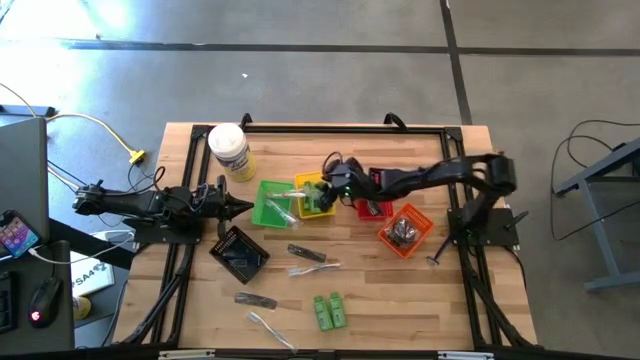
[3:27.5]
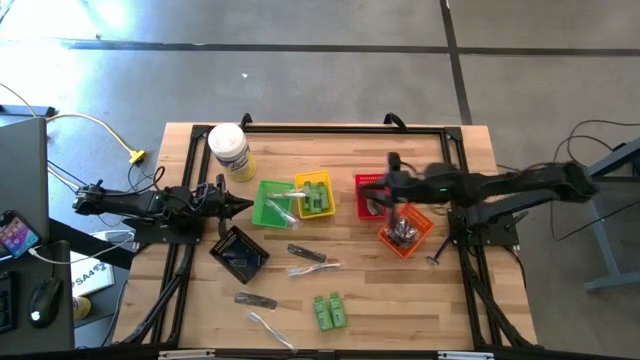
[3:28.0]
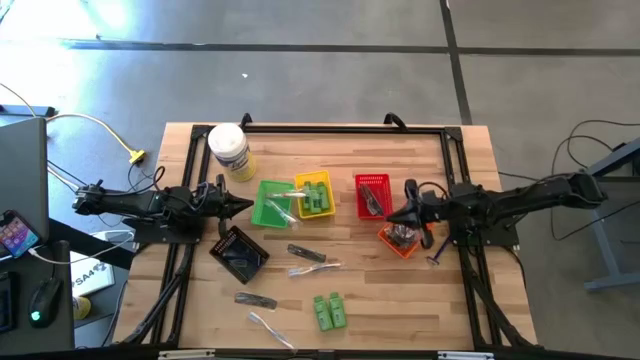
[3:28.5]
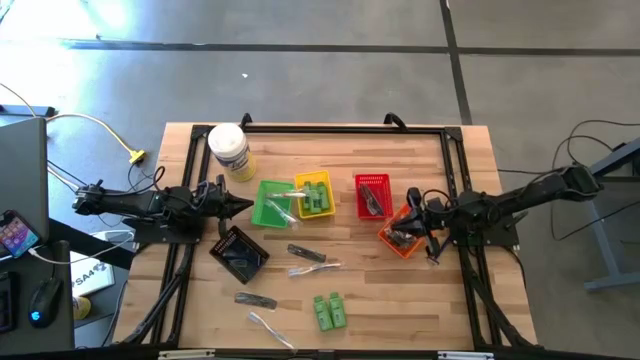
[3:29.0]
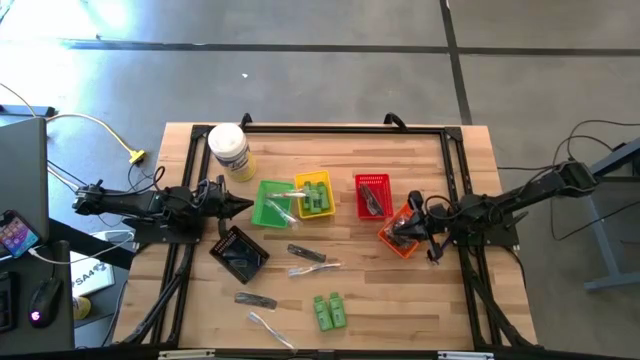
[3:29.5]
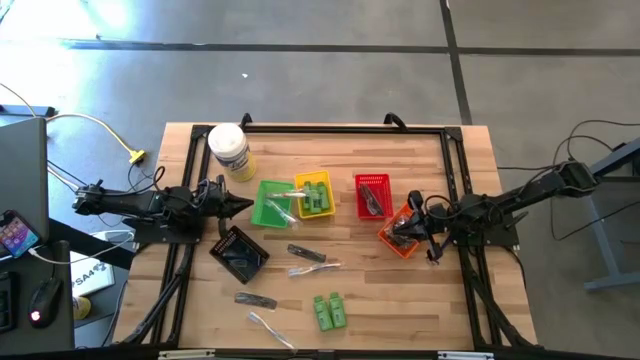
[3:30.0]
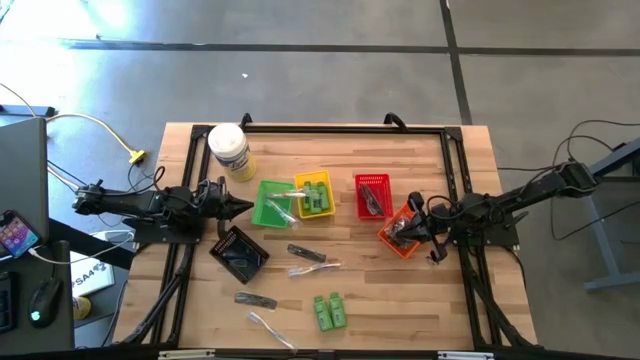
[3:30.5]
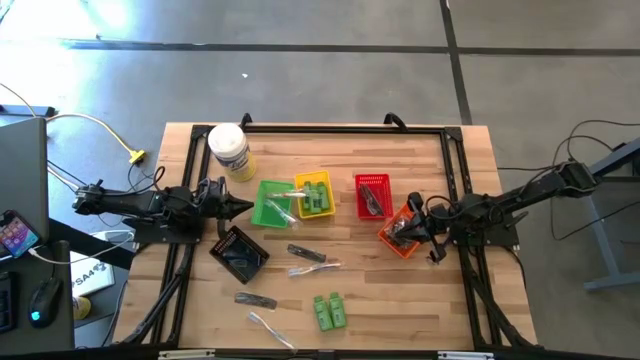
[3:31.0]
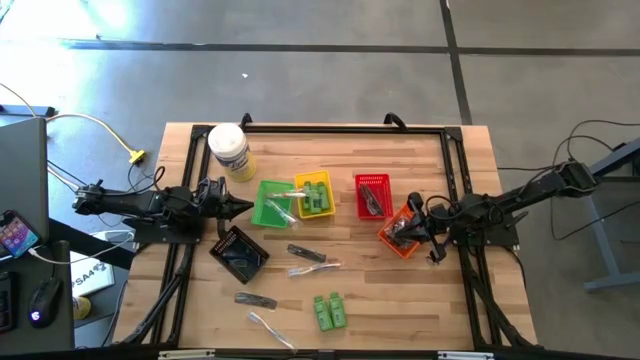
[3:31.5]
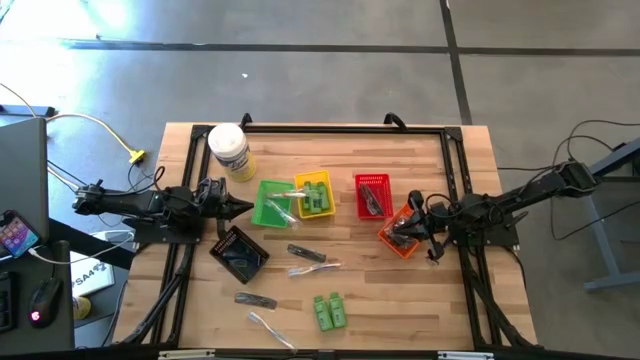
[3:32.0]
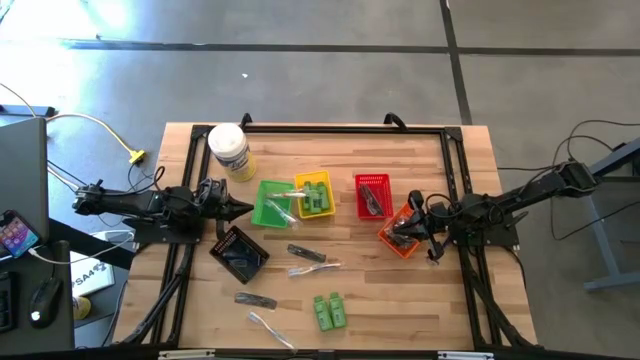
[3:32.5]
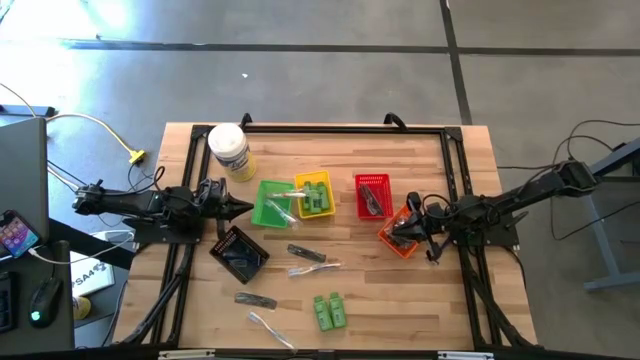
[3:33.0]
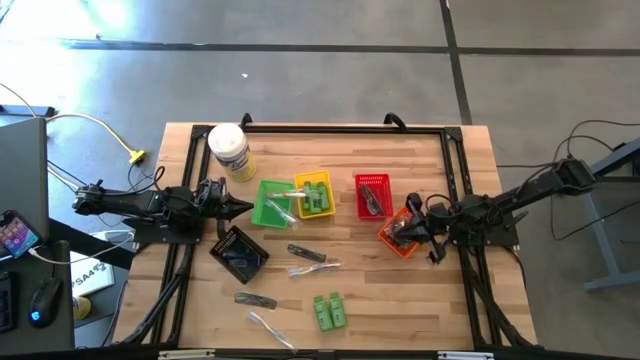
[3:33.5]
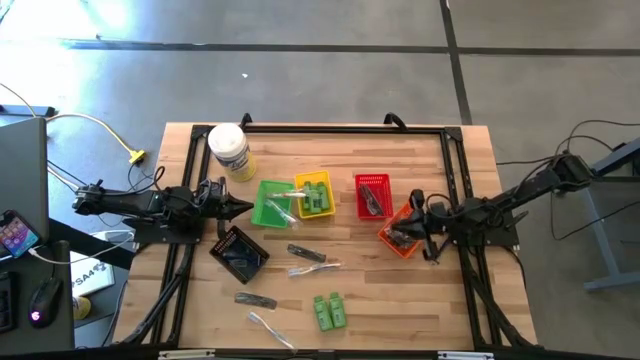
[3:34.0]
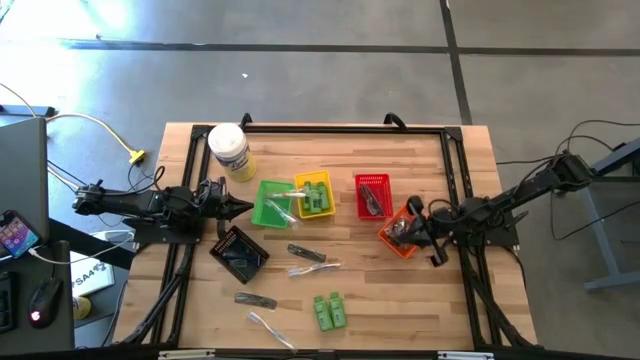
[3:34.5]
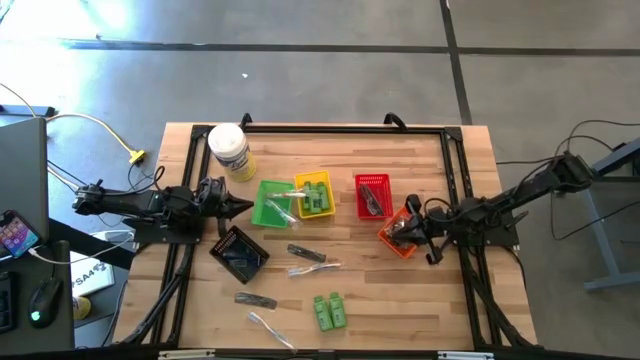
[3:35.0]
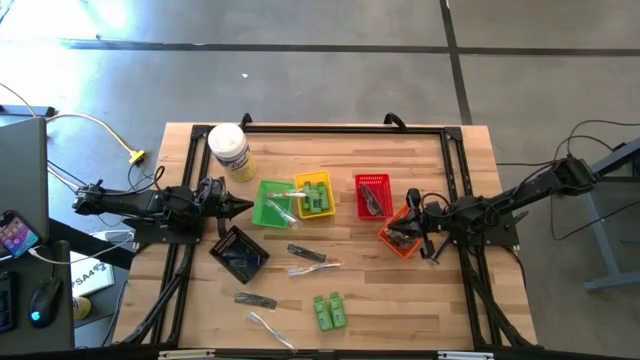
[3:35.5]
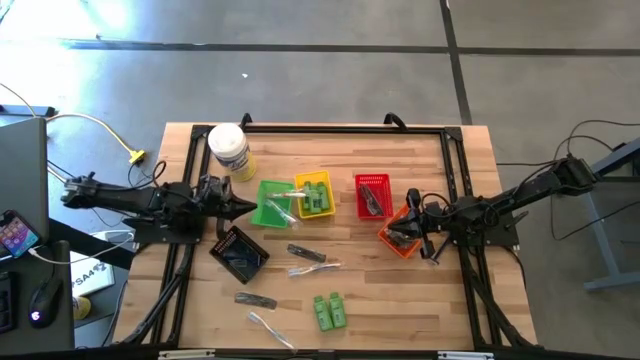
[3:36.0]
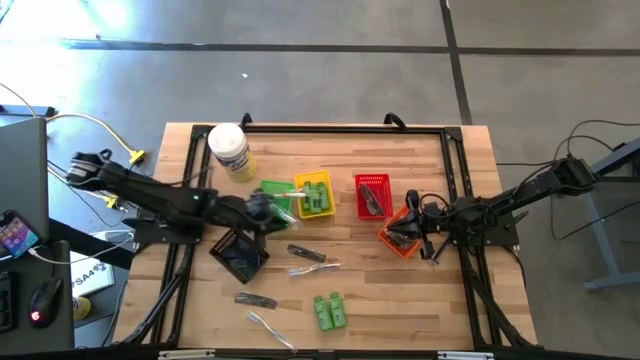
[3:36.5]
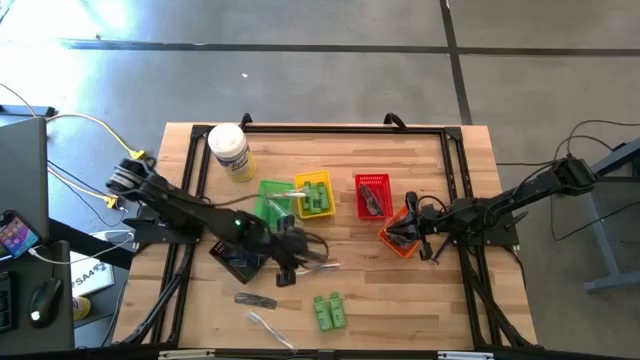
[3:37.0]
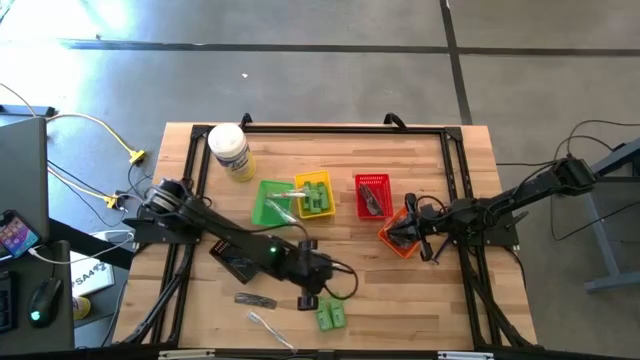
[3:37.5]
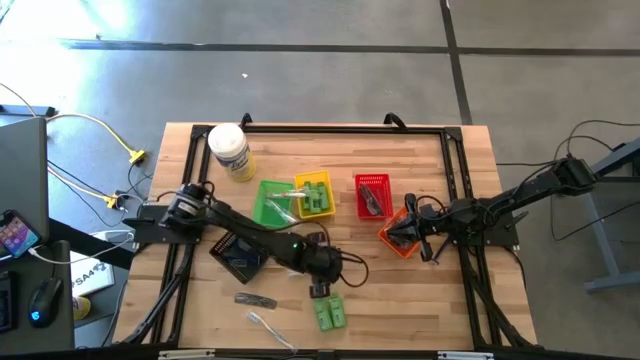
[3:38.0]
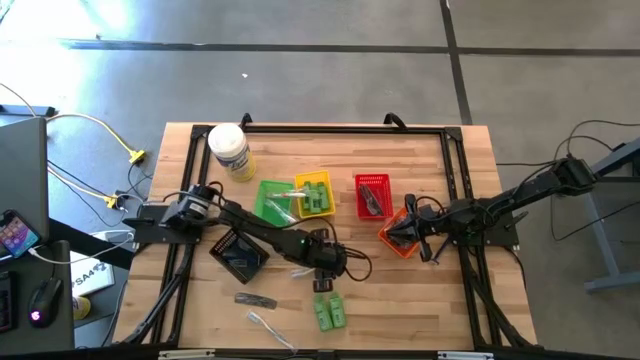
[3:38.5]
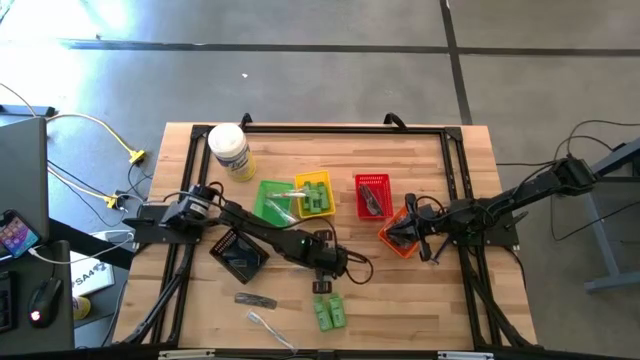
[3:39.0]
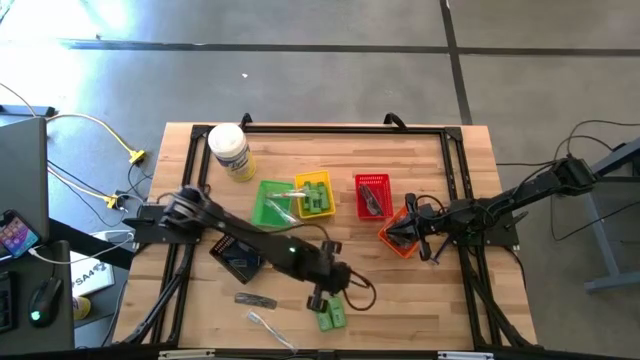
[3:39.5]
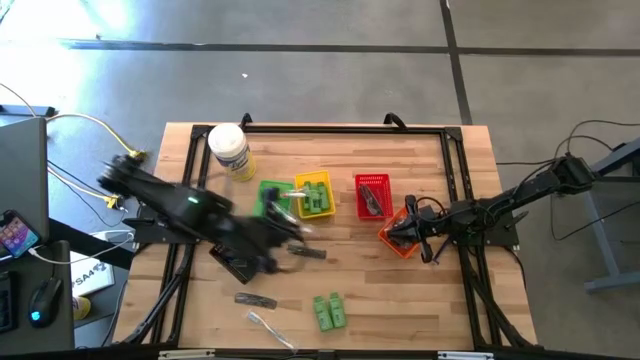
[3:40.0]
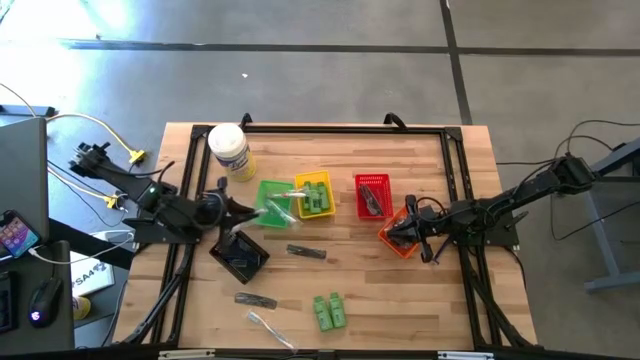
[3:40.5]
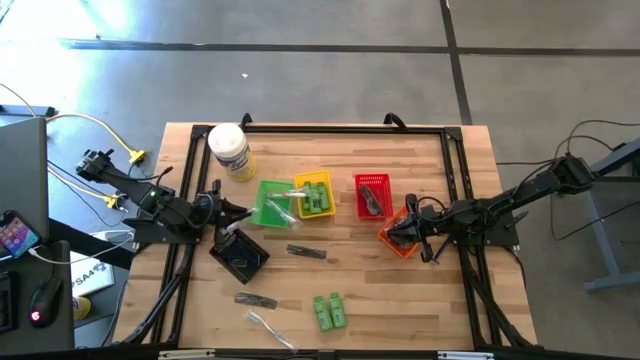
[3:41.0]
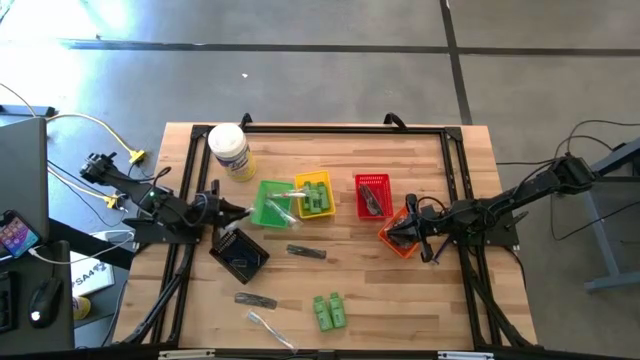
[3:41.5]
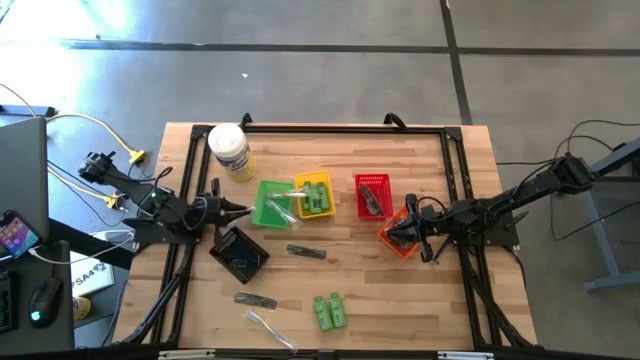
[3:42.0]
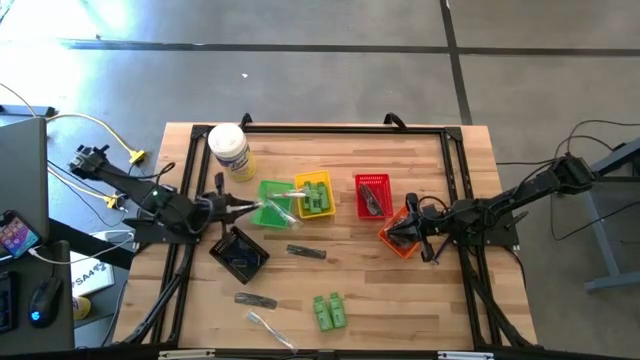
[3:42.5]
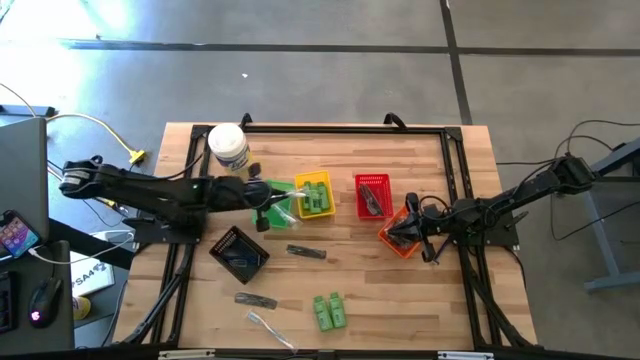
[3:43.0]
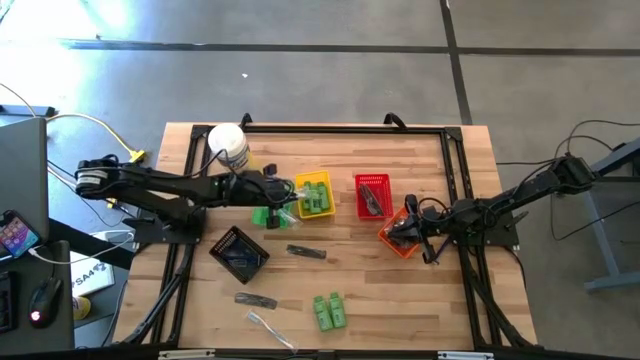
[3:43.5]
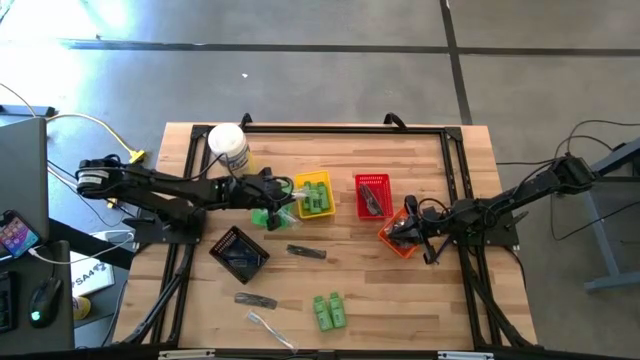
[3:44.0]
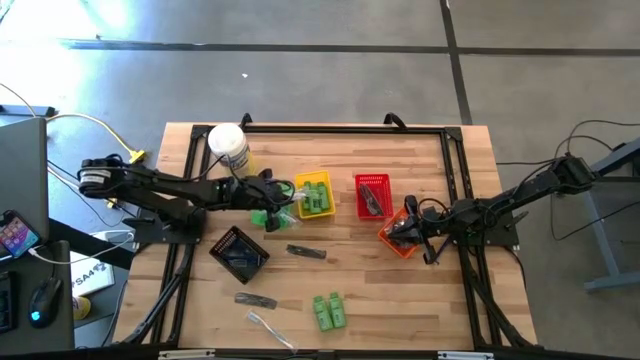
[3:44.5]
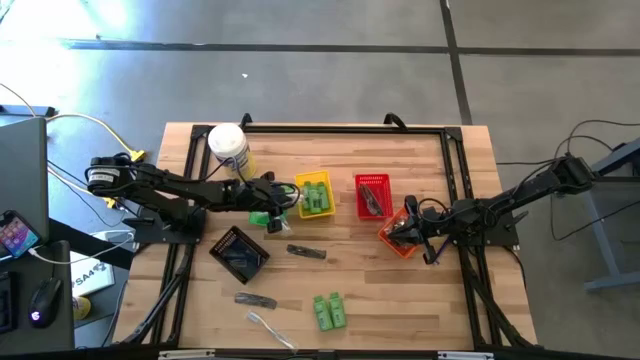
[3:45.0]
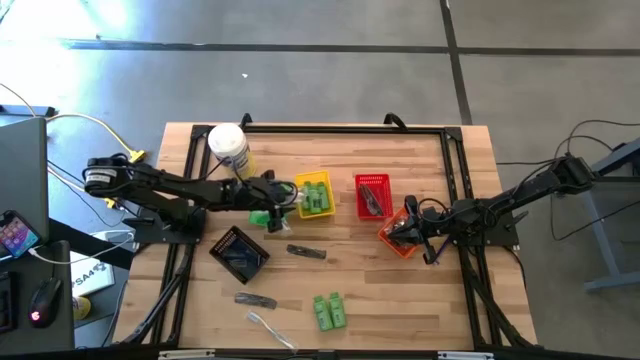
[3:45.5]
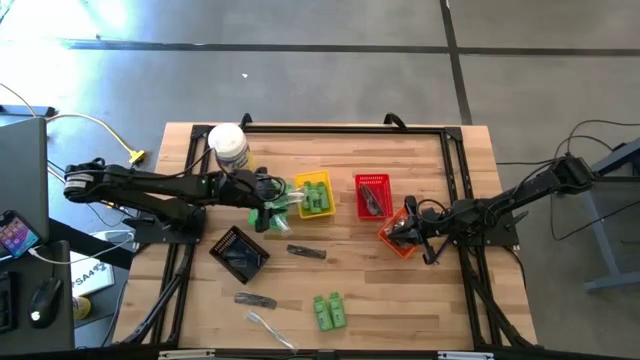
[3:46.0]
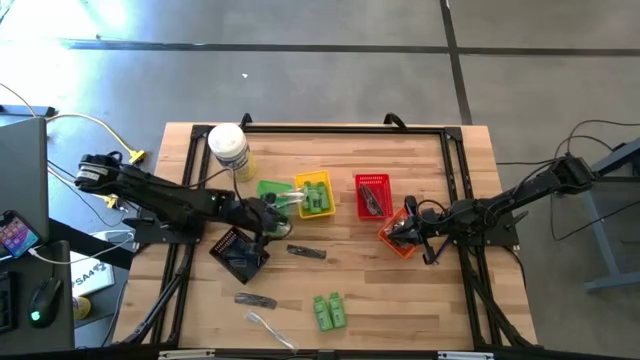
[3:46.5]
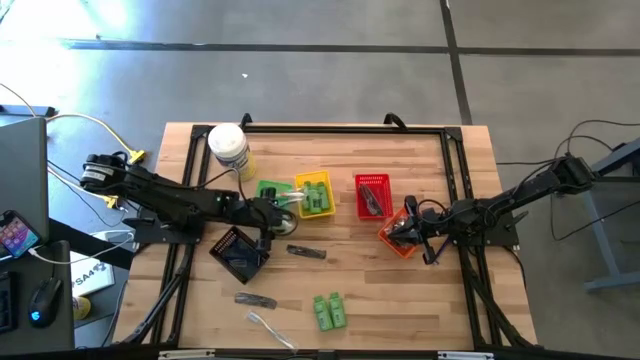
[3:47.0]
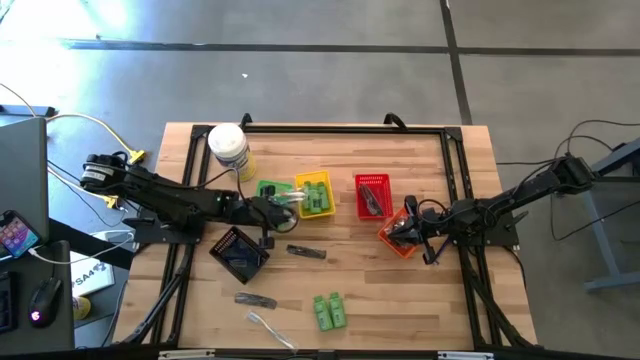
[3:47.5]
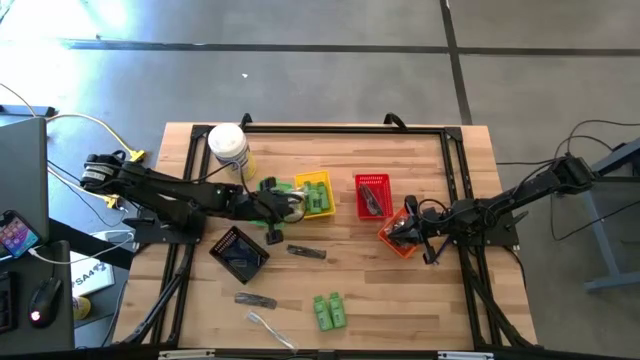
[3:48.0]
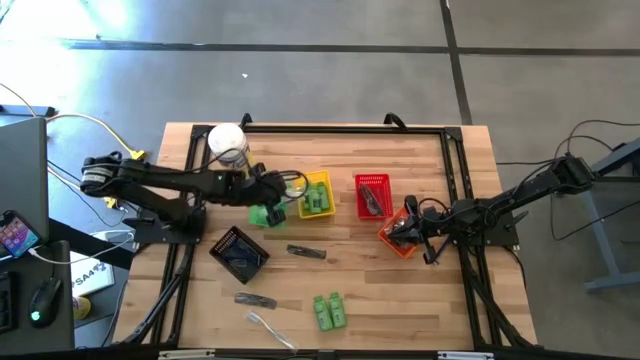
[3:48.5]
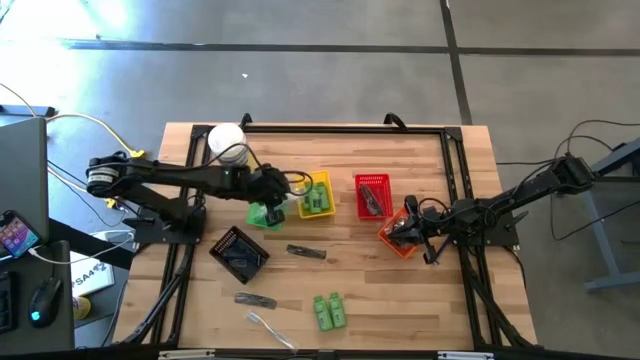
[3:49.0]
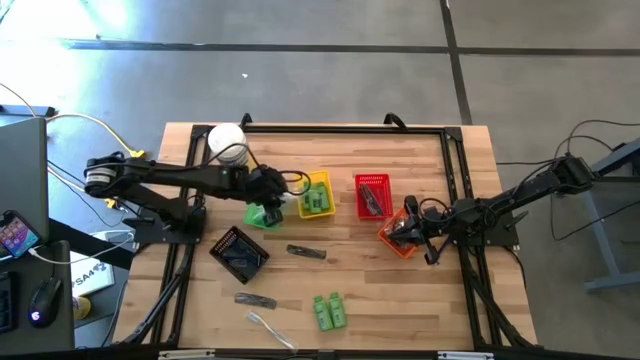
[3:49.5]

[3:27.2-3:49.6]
Task: Pick & Place Travel size toiletries
Put the top blue toothbrush into green basket
